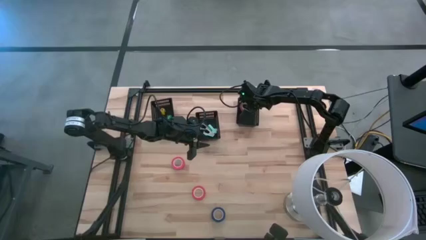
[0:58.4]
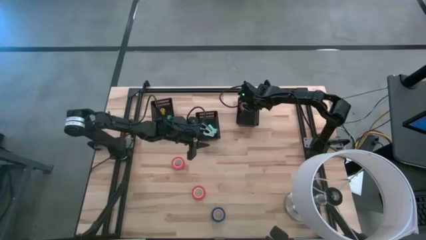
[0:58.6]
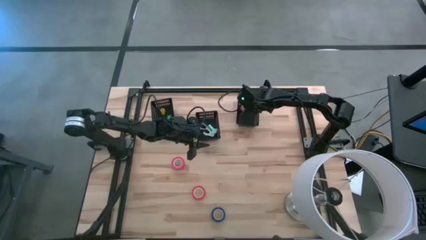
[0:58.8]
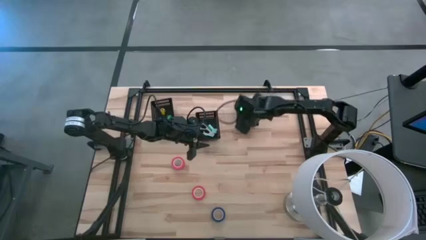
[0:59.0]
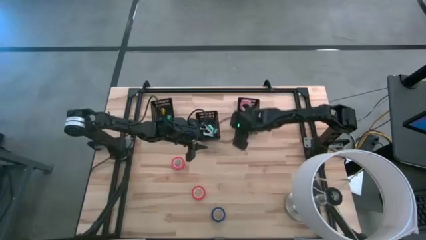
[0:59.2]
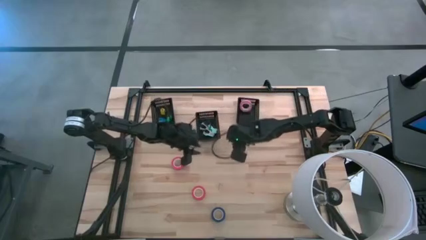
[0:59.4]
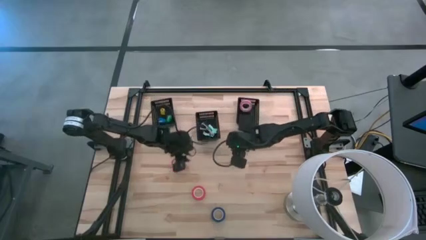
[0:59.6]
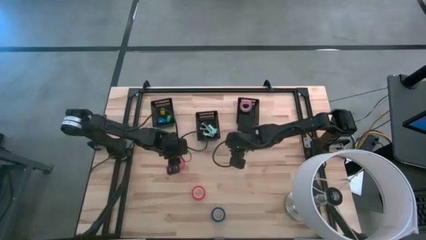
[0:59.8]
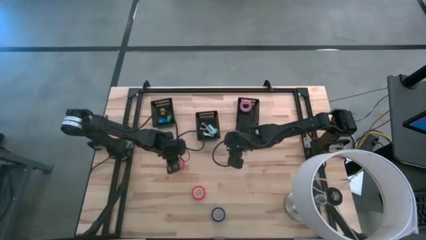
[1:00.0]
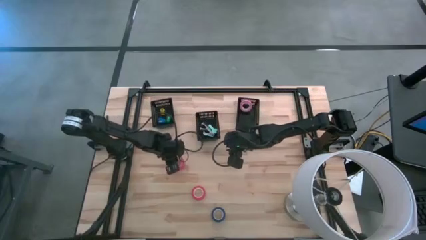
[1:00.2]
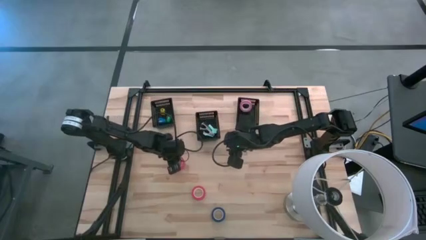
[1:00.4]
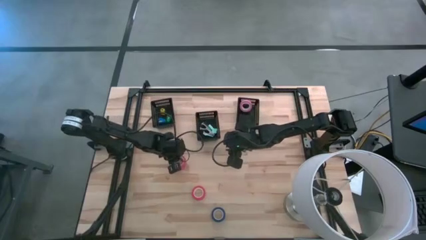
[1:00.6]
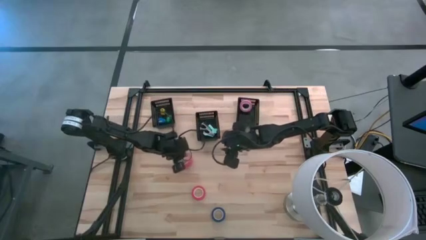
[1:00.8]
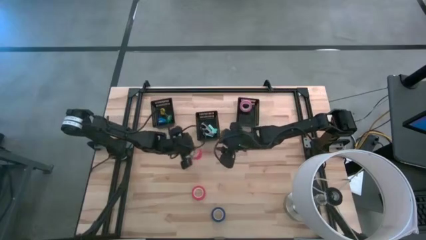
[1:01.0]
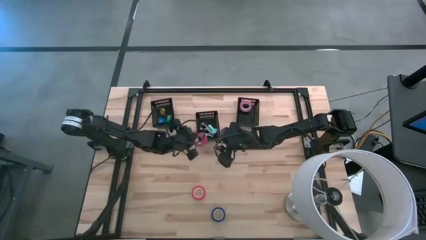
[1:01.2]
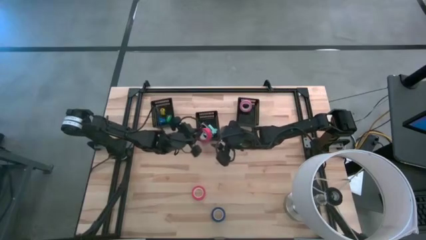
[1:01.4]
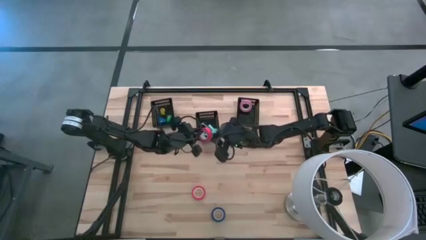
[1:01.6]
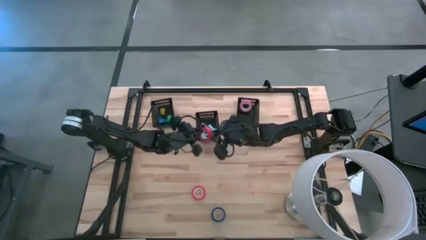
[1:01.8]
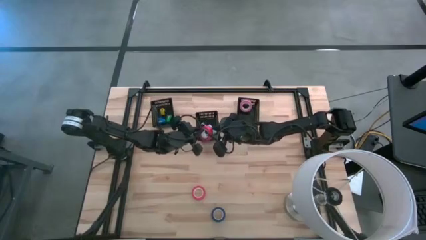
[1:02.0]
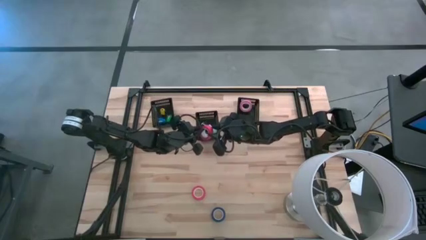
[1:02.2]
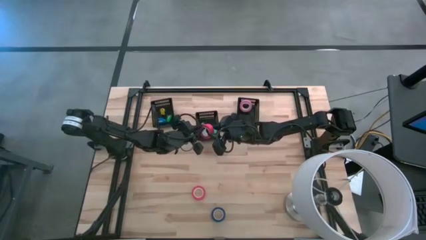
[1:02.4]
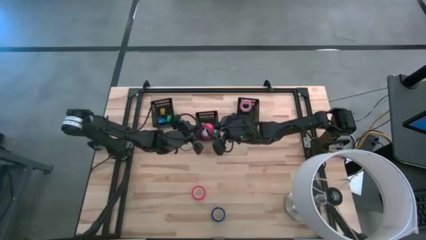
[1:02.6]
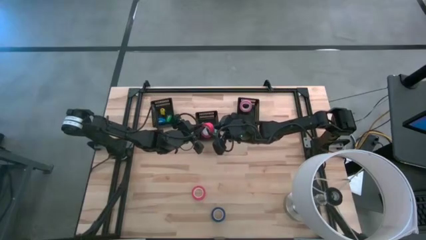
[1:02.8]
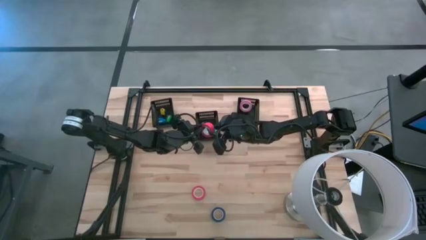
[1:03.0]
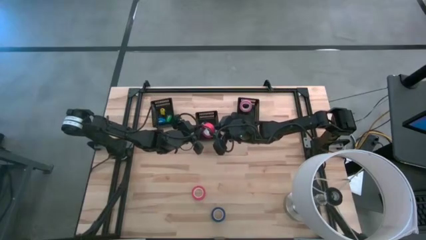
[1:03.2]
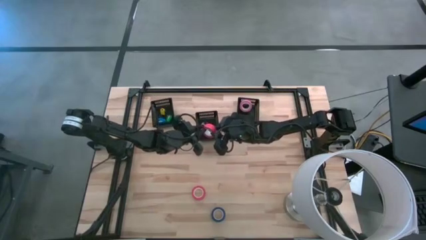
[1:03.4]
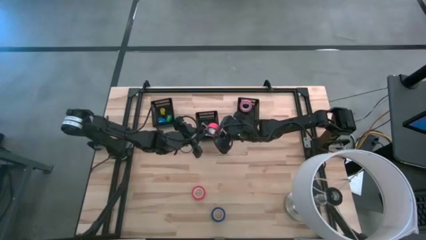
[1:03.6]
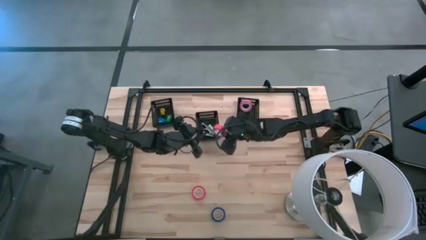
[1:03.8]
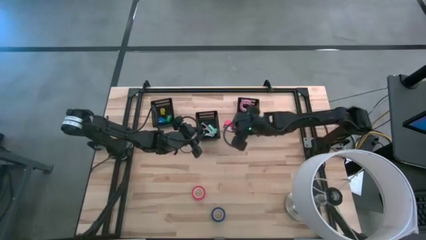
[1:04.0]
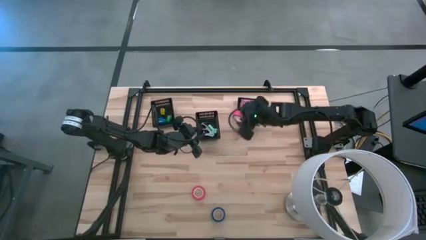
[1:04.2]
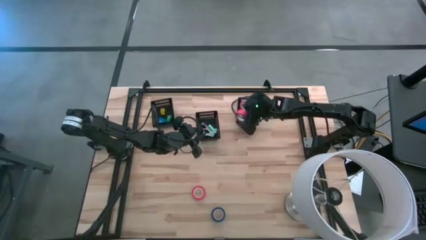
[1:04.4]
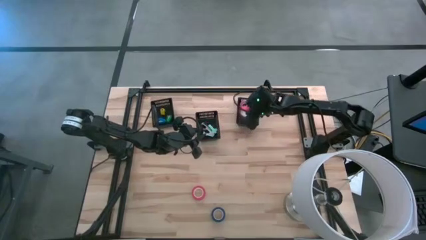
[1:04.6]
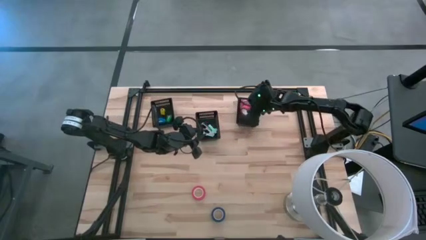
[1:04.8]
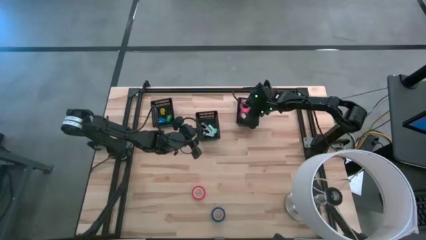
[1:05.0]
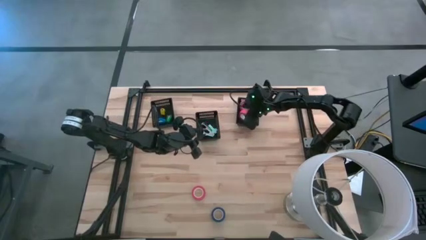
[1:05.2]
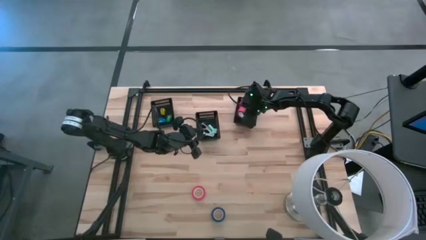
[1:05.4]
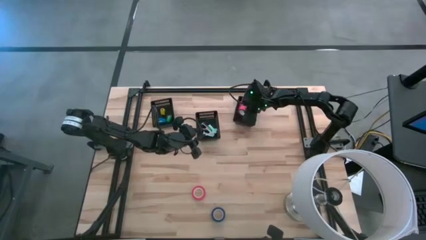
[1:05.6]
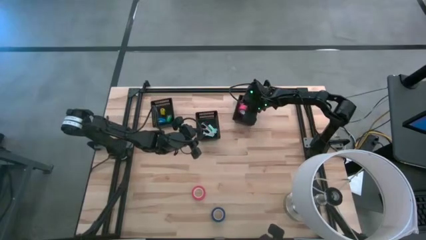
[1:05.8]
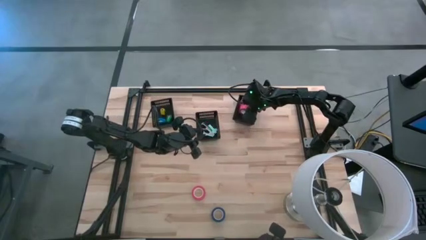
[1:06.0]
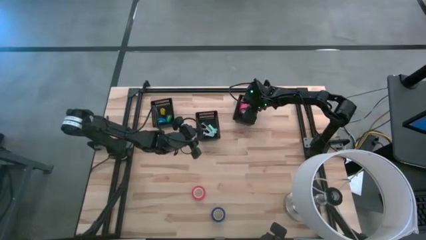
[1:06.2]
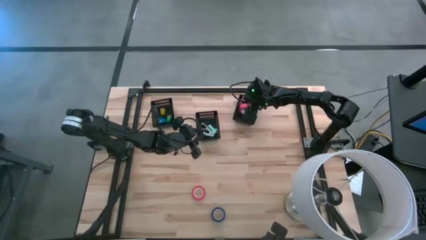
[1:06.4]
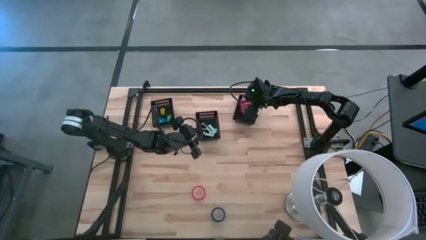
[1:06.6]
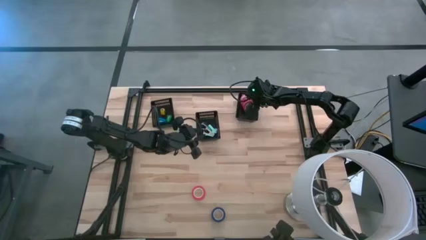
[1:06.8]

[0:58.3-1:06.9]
Task: Pick and place Stapler, Stapler remover, tape
Put the top orange tape into the right black bin

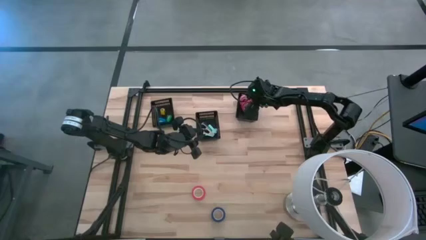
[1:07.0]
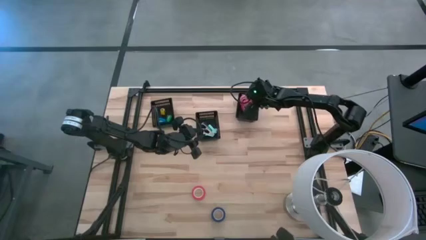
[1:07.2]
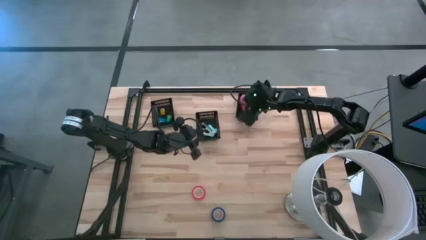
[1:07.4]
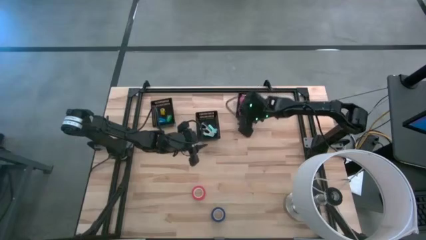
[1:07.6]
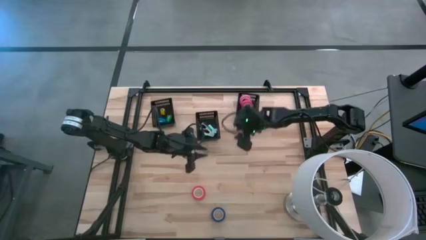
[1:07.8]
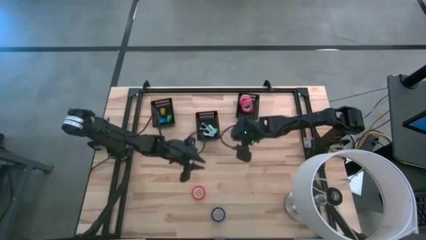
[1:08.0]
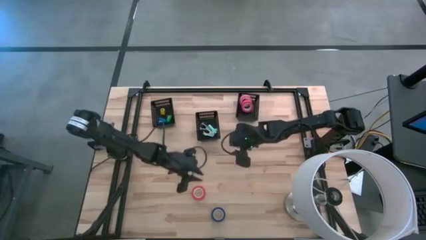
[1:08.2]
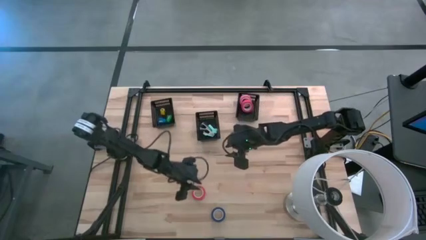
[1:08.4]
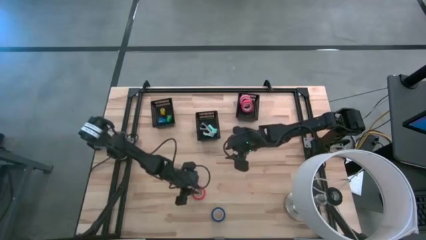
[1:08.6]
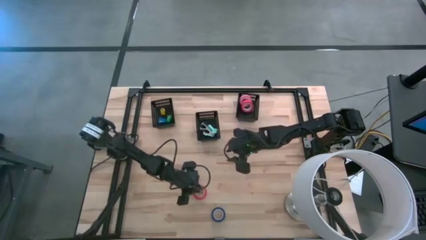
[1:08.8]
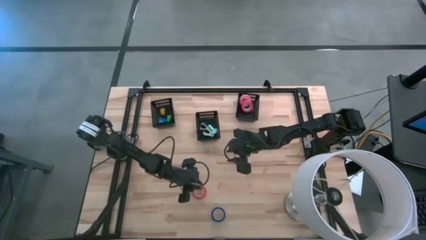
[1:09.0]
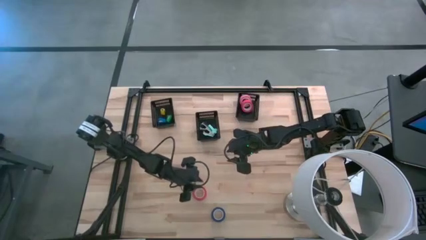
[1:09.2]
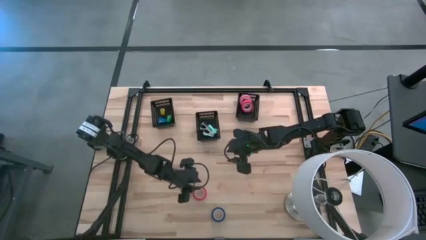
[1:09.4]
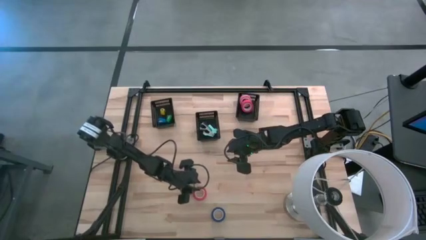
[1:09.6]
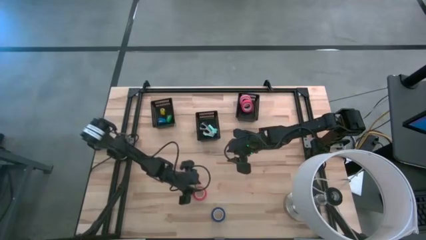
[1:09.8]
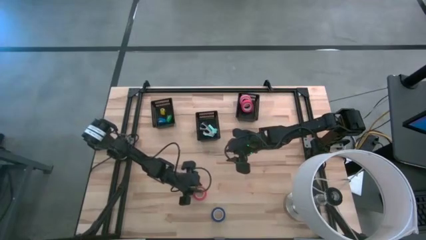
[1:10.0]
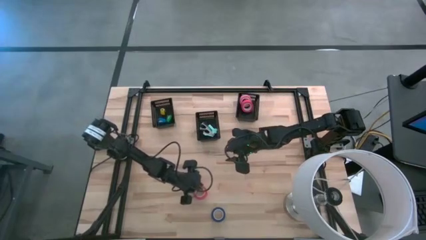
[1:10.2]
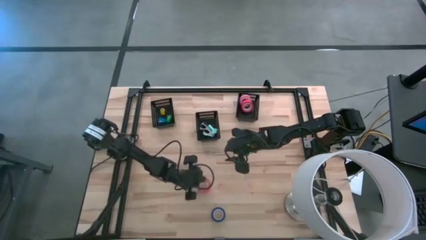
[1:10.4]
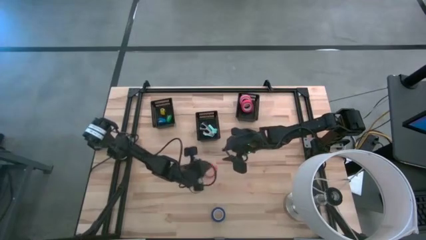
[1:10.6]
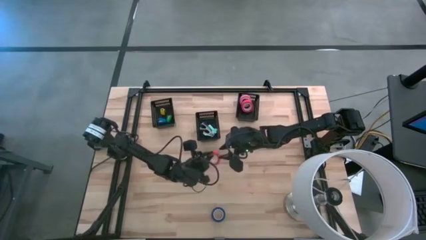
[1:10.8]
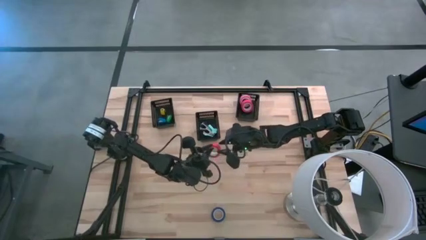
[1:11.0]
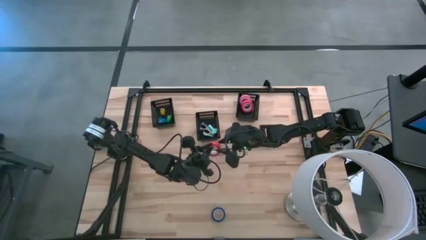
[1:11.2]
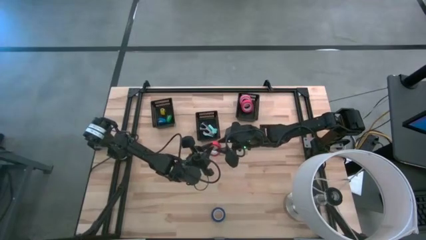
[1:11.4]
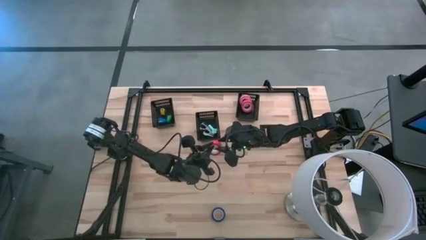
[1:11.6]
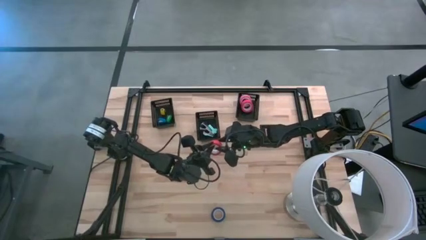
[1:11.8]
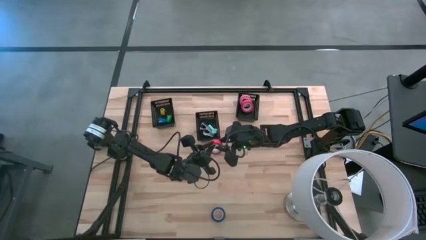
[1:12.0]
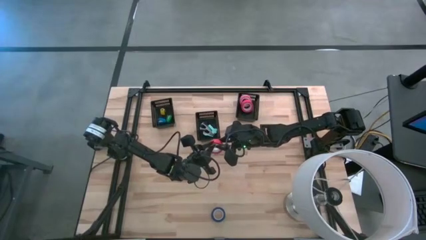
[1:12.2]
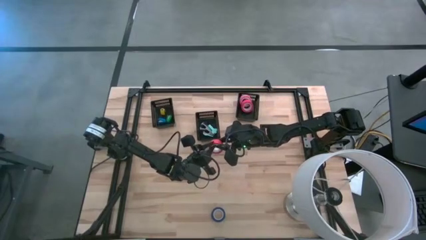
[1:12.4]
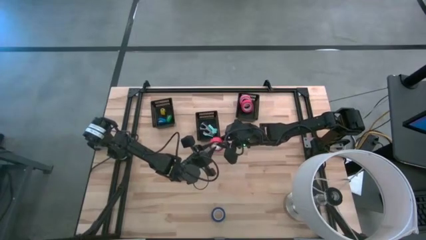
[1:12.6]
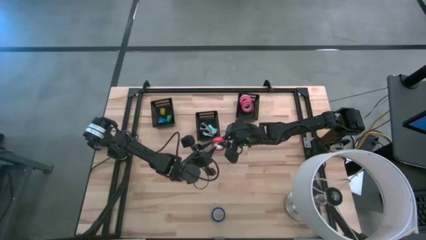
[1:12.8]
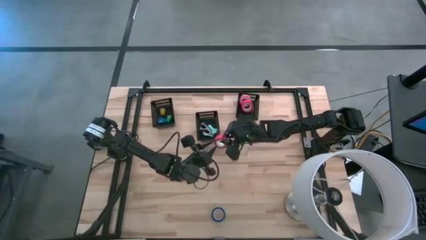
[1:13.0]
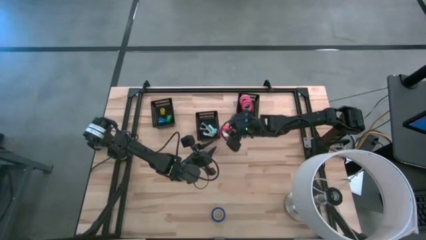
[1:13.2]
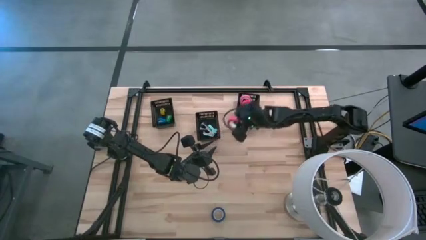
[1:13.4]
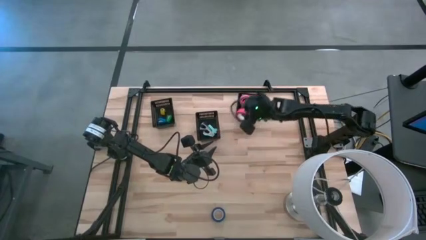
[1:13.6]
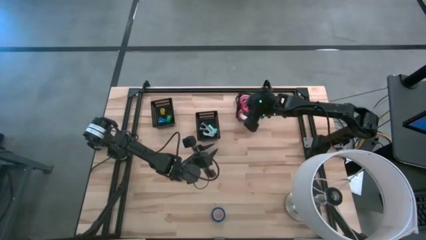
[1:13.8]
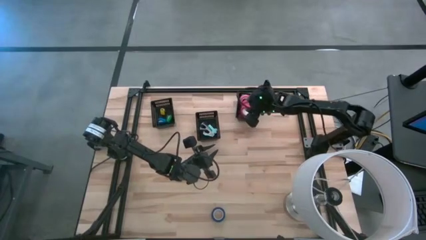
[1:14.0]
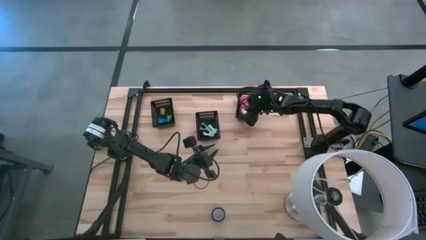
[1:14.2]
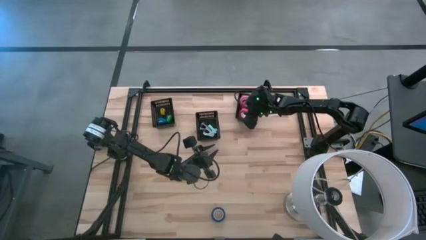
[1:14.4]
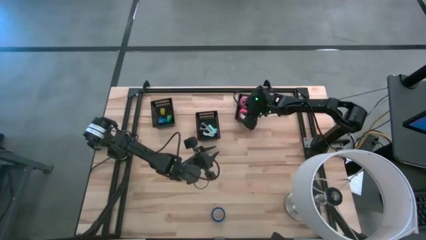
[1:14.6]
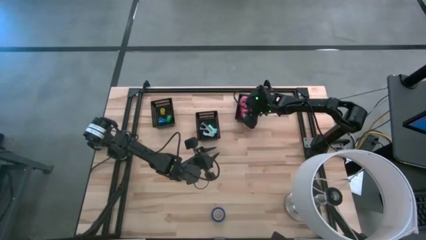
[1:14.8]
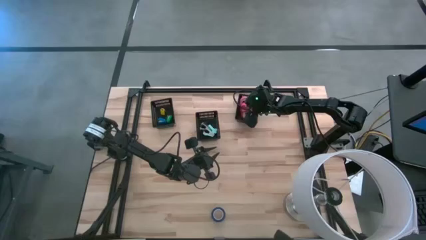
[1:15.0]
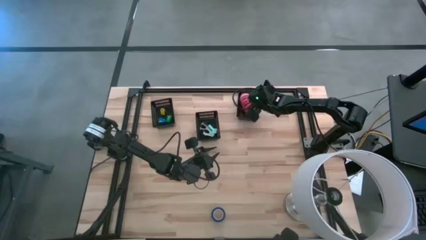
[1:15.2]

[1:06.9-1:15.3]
Put the orange tape into the right black bin
